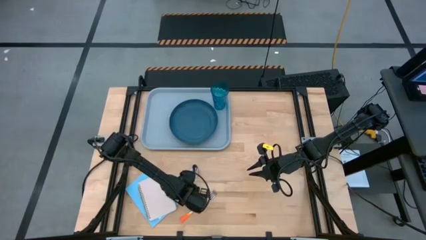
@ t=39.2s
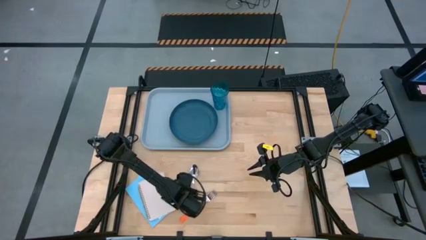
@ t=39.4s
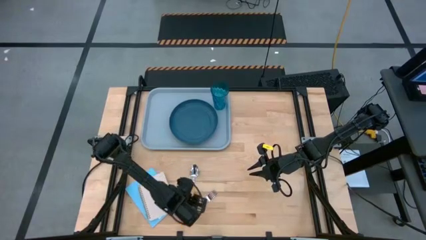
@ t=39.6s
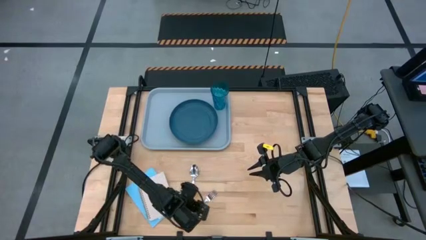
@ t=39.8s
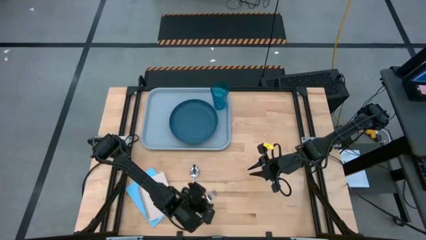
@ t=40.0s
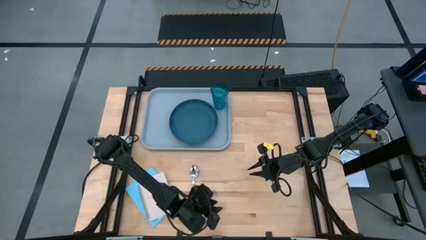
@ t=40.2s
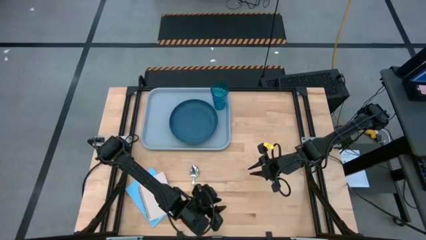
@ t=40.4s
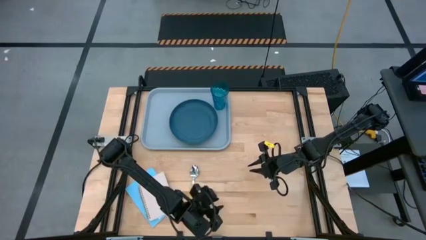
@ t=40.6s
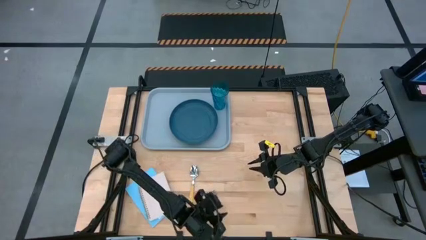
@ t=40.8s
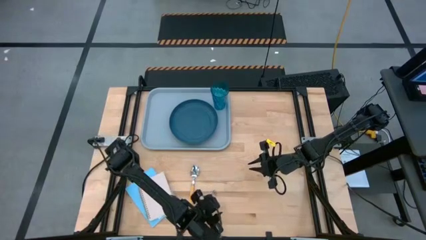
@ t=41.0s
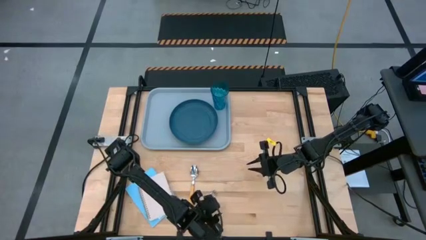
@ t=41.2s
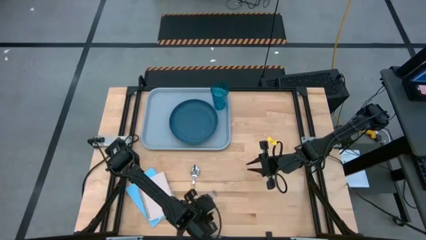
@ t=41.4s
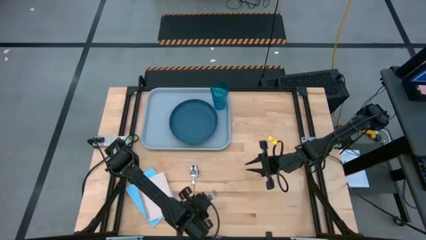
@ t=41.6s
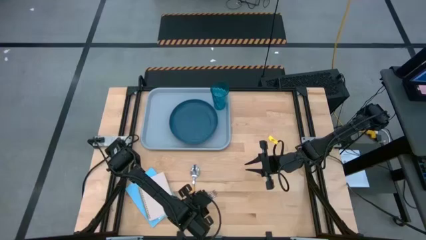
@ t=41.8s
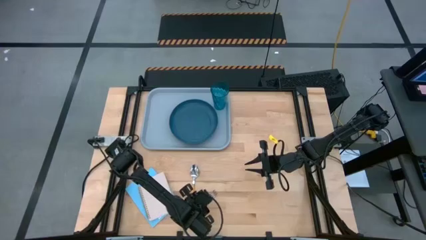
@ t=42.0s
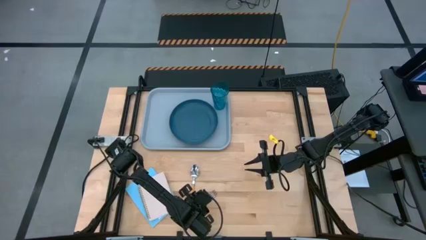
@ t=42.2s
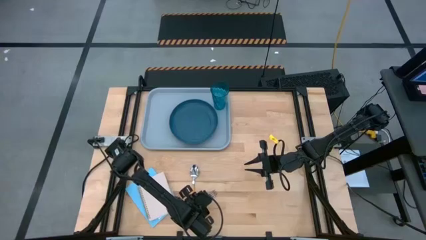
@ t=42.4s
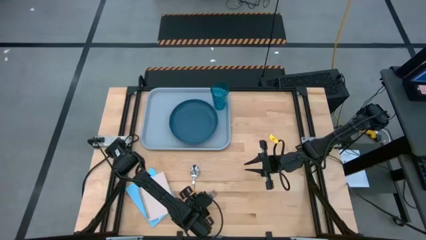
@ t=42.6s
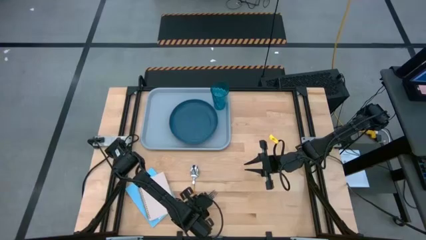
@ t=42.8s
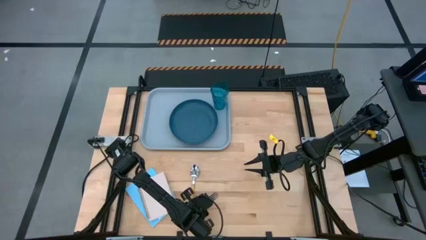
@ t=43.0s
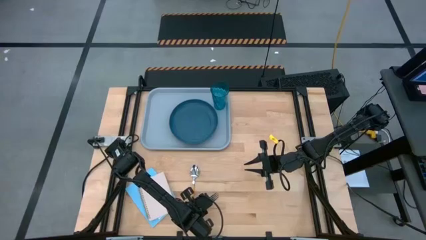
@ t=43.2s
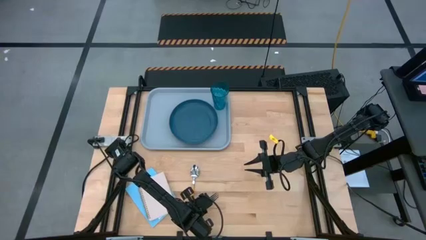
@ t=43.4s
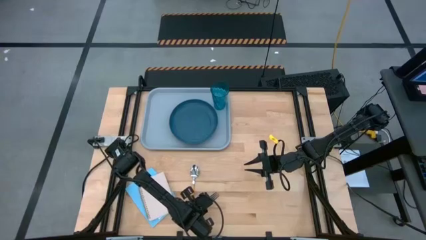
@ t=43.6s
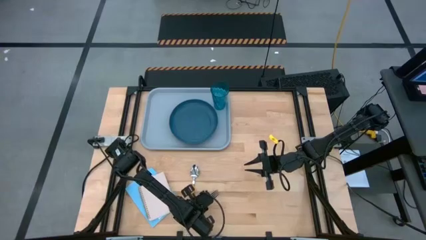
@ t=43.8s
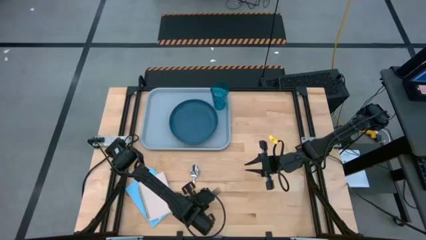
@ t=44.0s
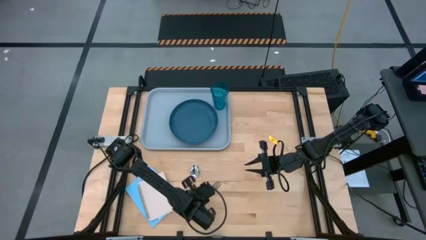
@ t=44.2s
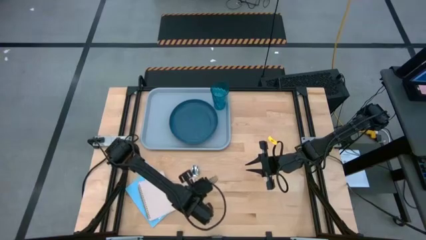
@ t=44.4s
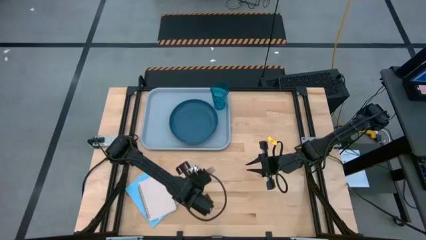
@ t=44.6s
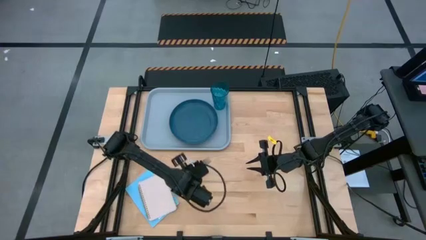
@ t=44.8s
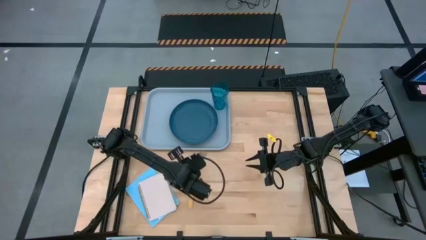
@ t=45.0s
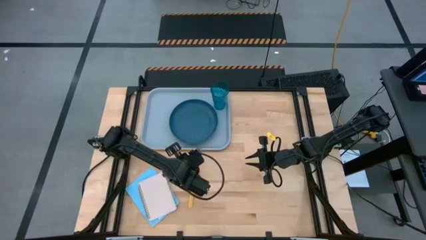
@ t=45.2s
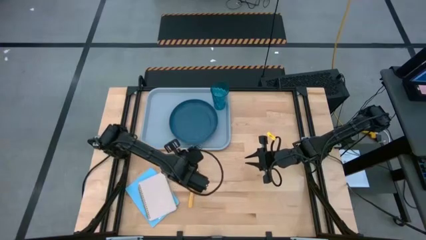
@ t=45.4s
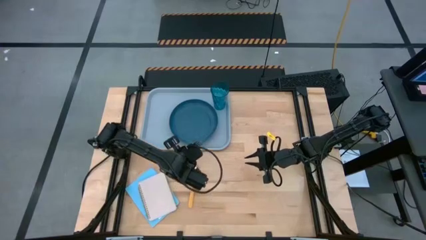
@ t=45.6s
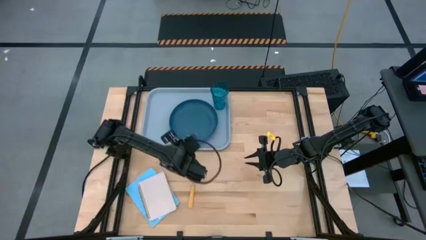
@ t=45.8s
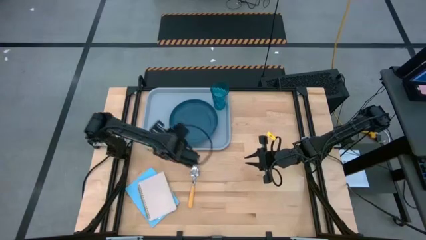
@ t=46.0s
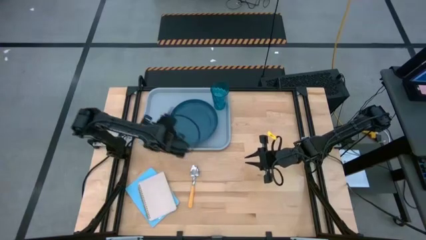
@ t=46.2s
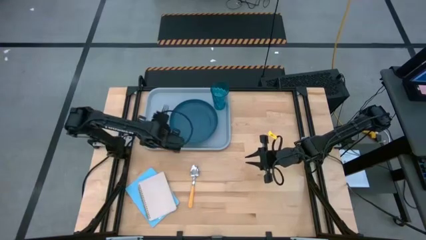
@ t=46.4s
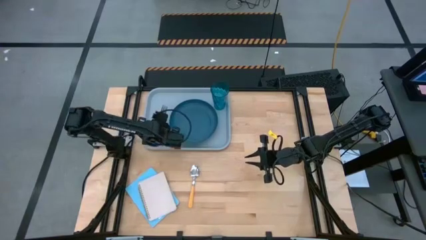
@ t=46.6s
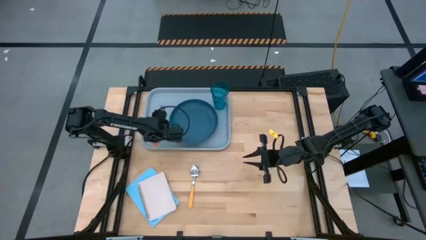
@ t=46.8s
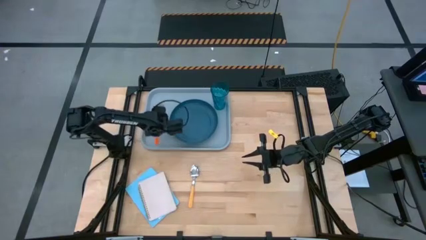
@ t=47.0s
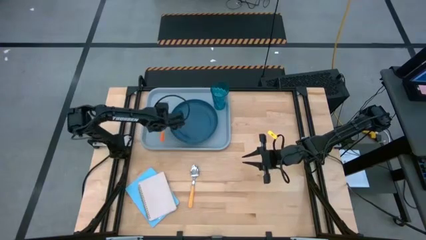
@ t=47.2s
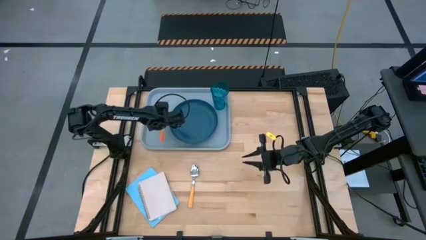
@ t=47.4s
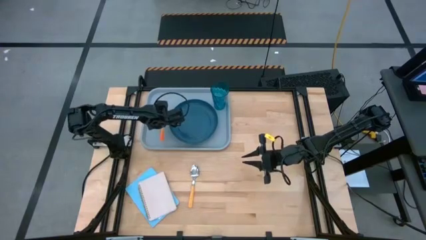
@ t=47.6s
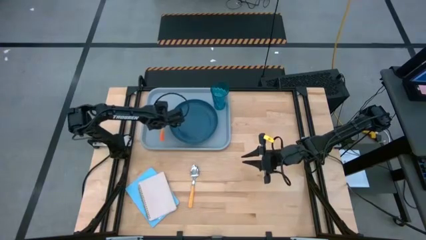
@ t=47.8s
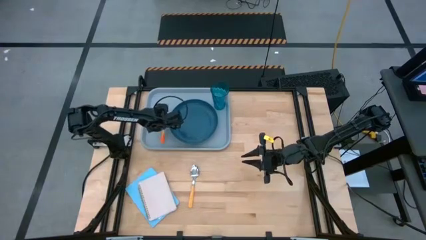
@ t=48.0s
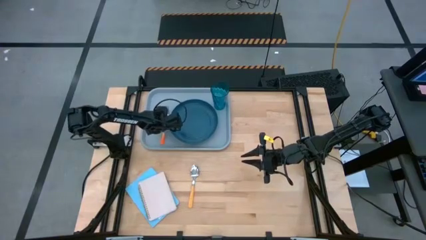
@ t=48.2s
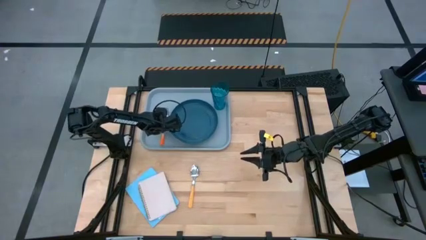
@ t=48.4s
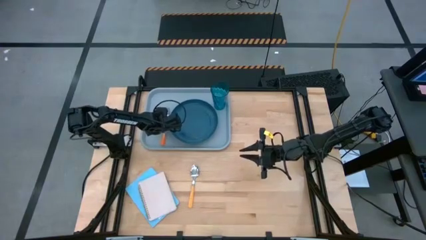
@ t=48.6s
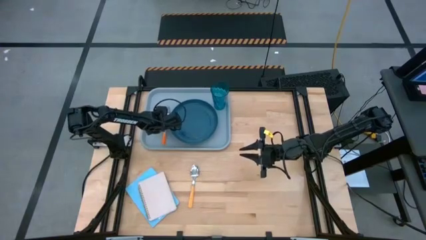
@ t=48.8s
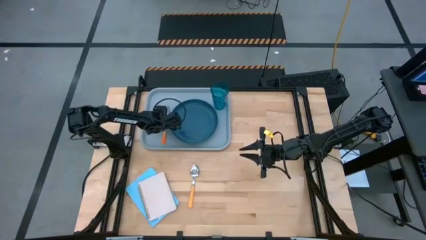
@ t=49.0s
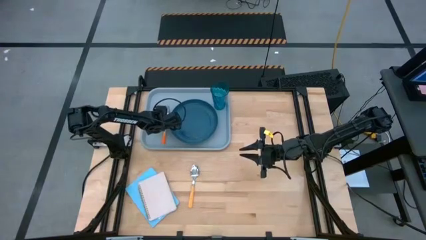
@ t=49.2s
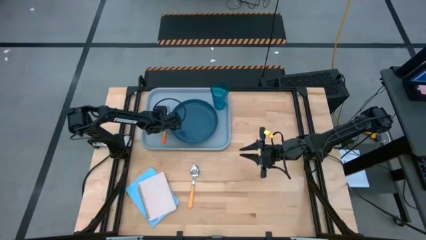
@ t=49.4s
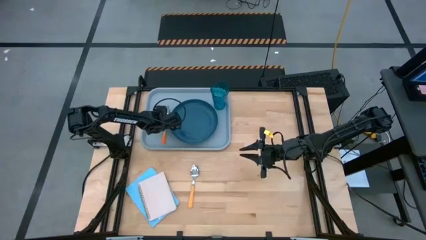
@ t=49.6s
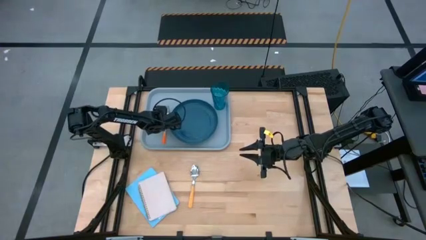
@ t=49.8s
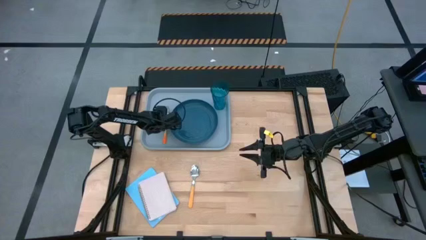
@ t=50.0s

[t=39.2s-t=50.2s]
Task: Pick and place plate/cup/fork/spoon on tray
Put the orange fork on the light blue tray to the left of the blue plate

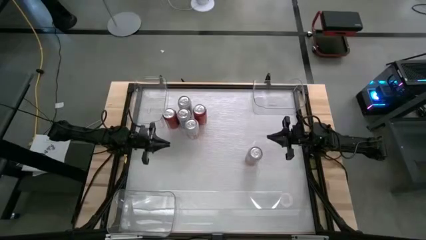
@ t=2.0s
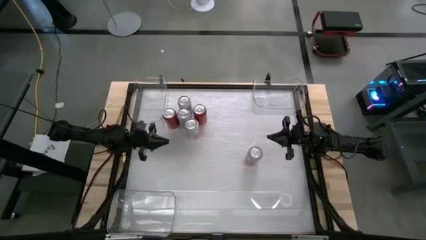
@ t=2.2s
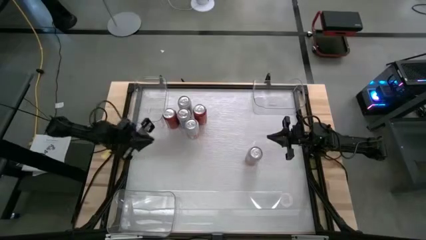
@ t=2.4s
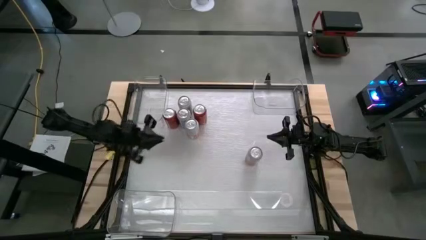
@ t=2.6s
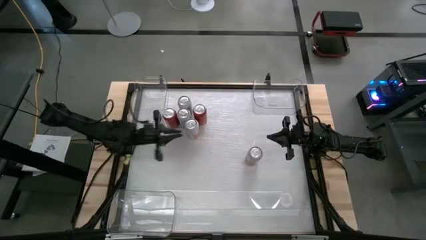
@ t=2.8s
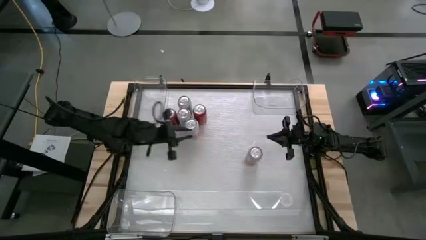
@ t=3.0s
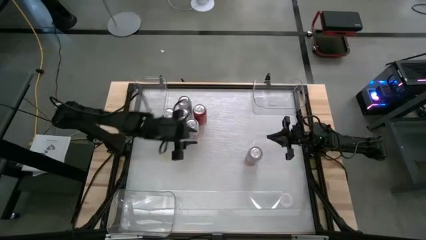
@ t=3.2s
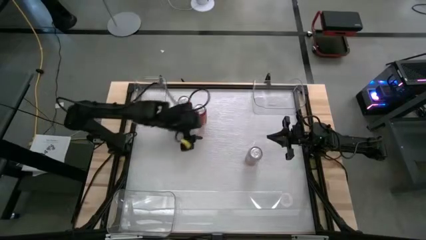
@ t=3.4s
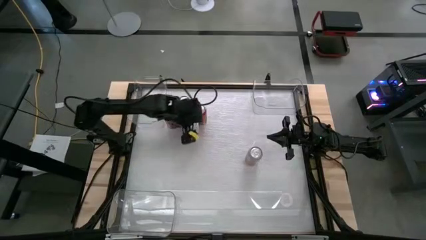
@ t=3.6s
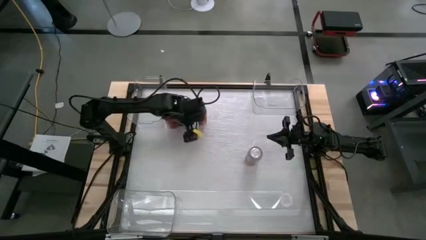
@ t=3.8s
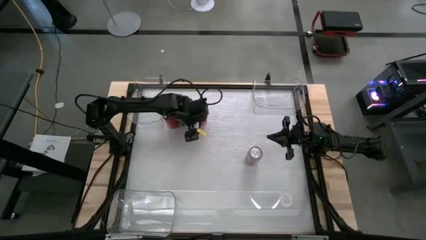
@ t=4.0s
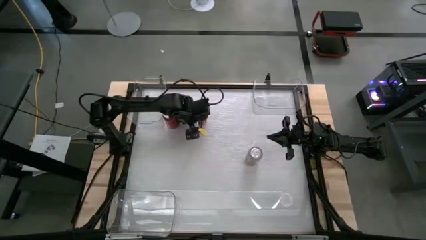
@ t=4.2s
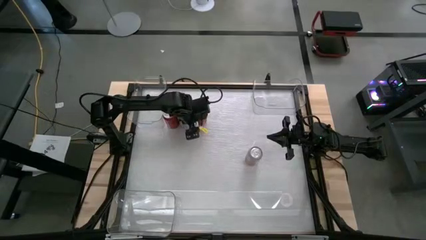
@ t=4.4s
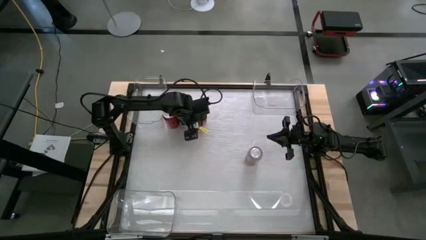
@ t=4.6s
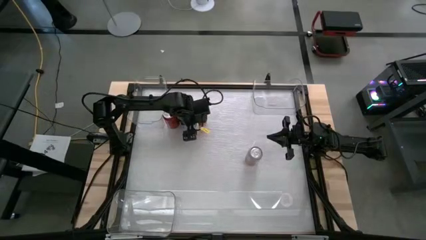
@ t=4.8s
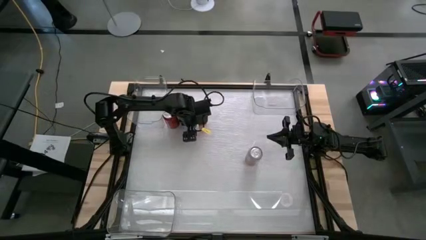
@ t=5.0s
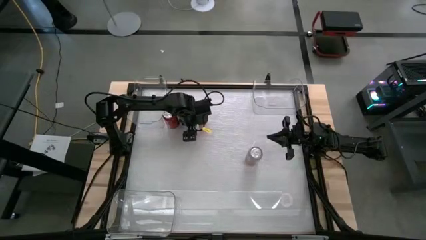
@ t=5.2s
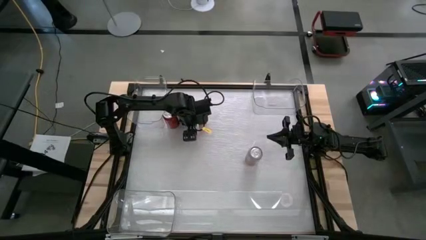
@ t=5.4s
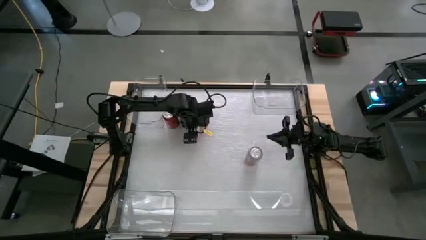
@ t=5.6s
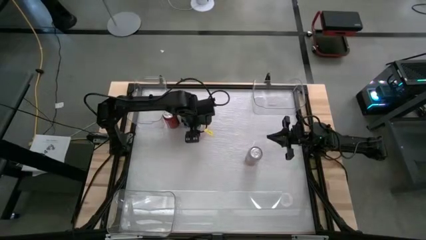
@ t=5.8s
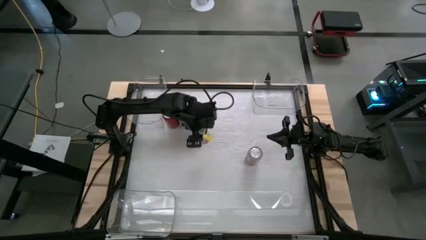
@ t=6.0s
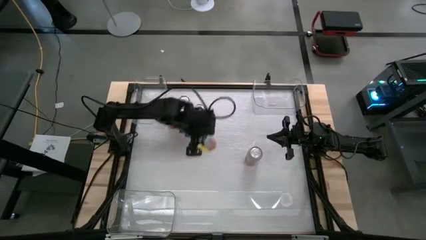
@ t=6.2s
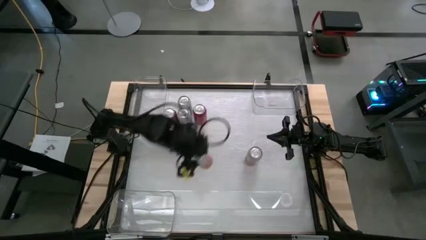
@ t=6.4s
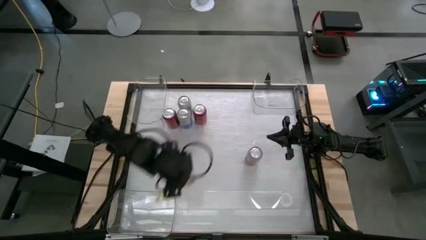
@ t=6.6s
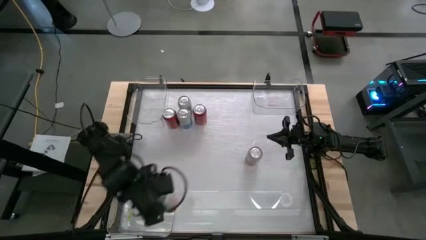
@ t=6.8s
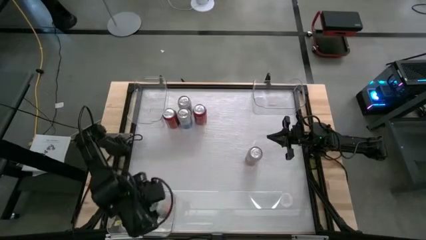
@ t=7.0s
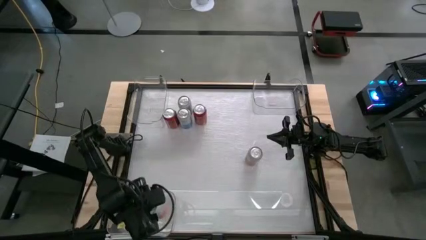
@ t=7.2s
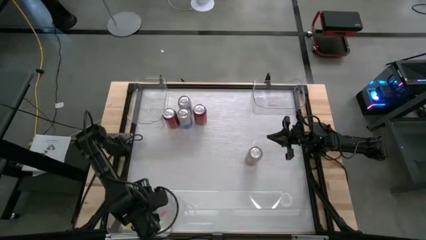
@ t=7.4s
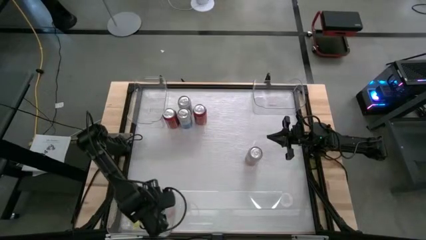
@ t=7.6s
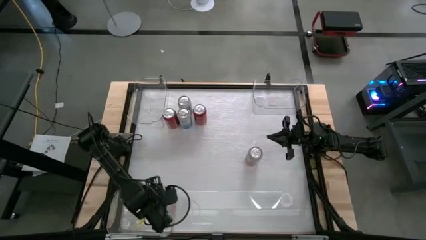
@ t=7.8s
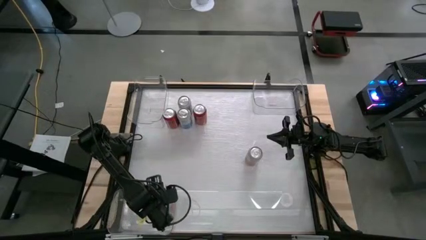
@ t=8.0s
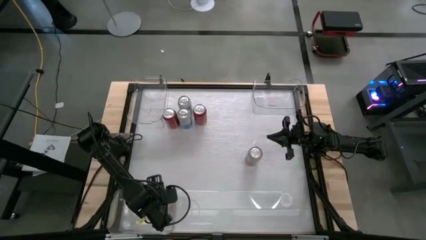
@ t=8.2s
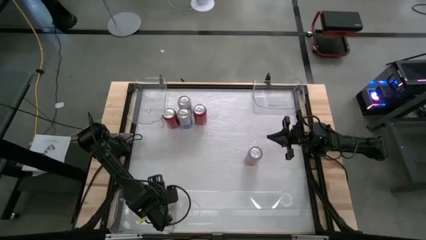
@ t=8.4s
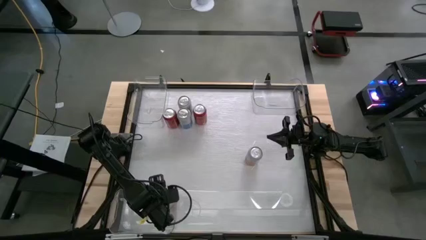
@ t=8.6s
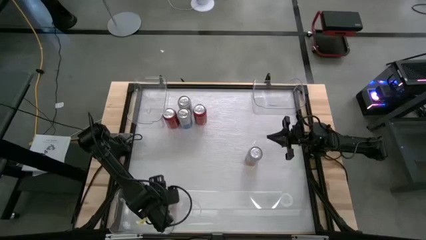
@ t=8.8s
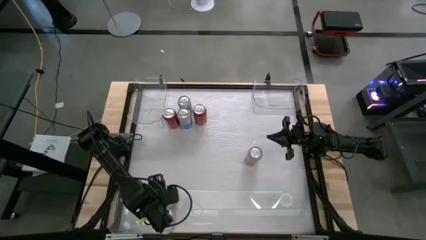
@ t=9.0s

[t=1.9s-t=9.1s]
Task: Sort soda cans
Put the left orange and white soda can into the bottom transparent bin
